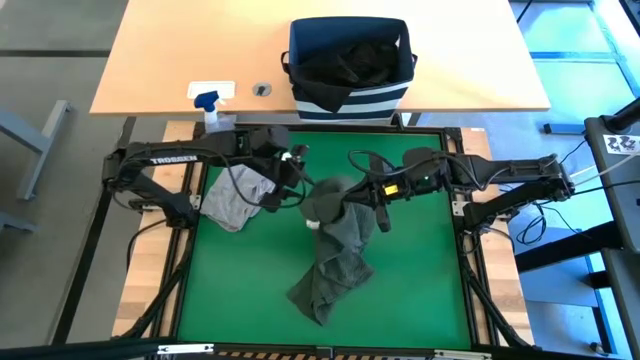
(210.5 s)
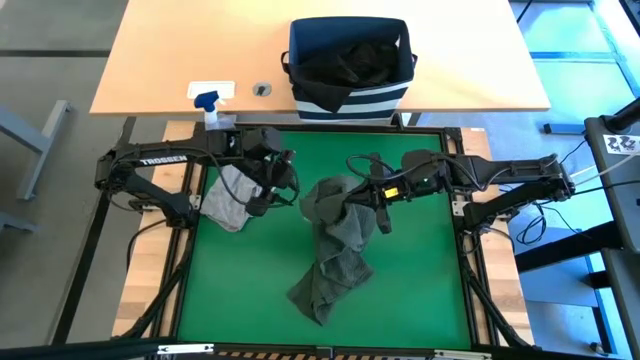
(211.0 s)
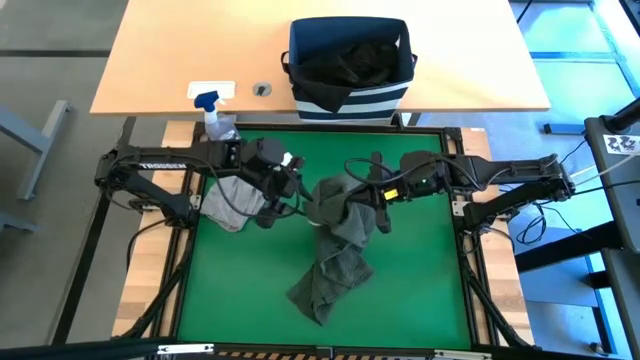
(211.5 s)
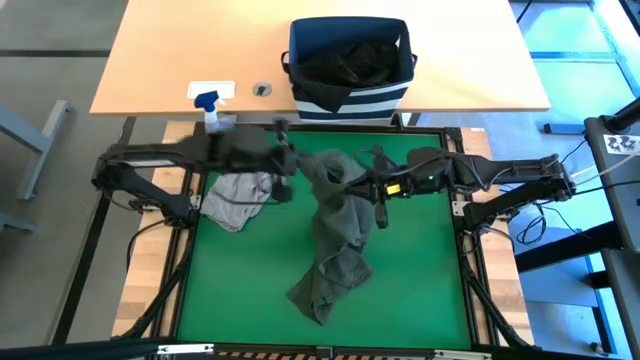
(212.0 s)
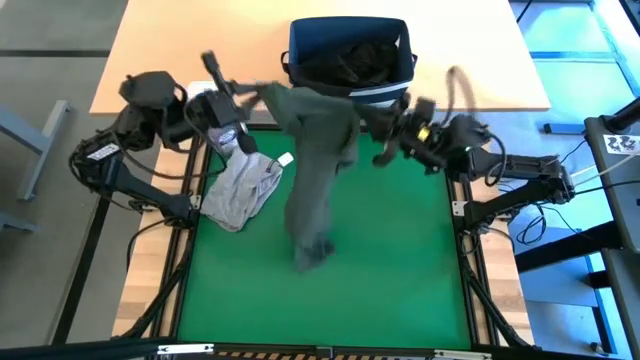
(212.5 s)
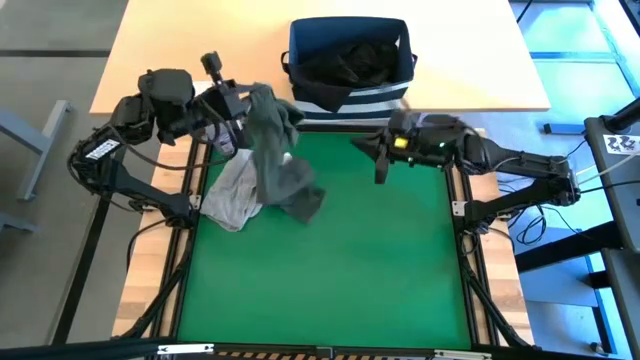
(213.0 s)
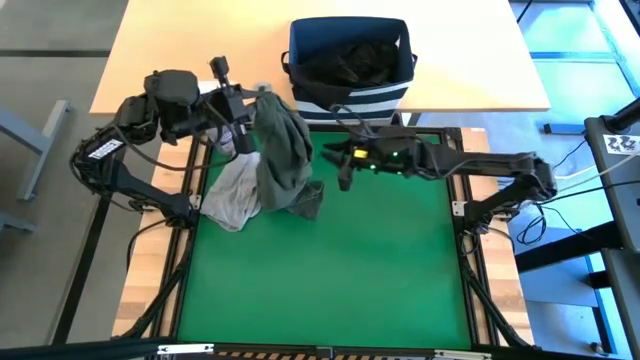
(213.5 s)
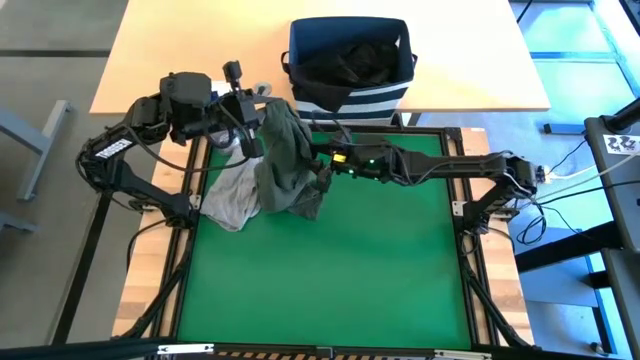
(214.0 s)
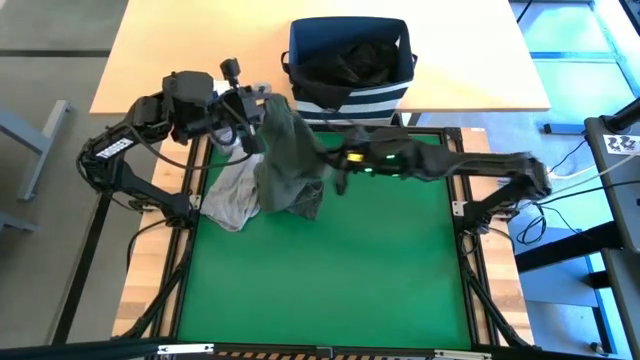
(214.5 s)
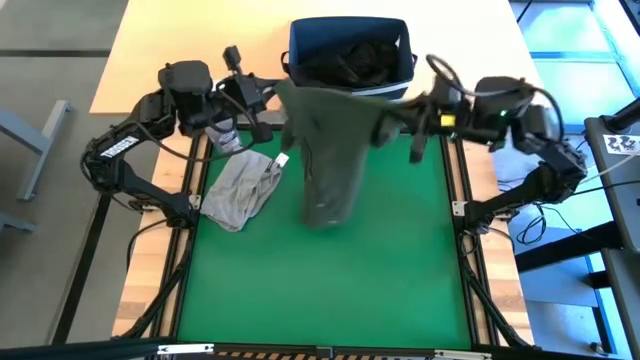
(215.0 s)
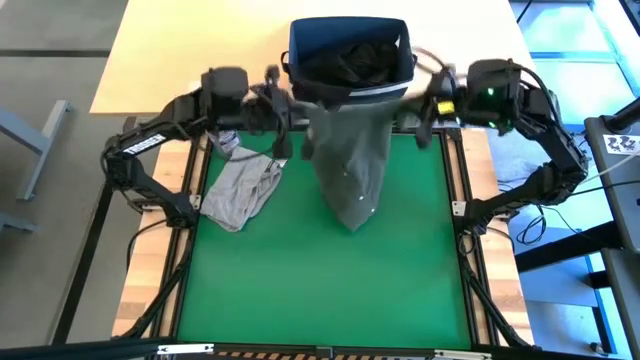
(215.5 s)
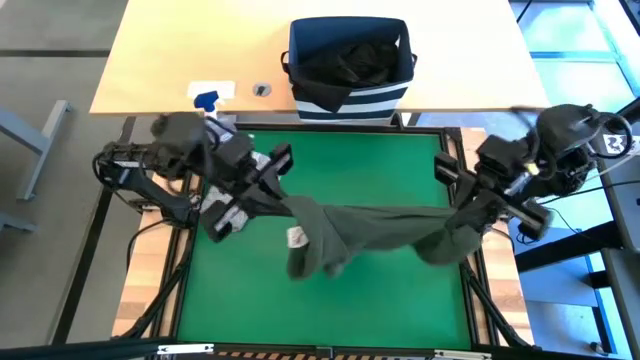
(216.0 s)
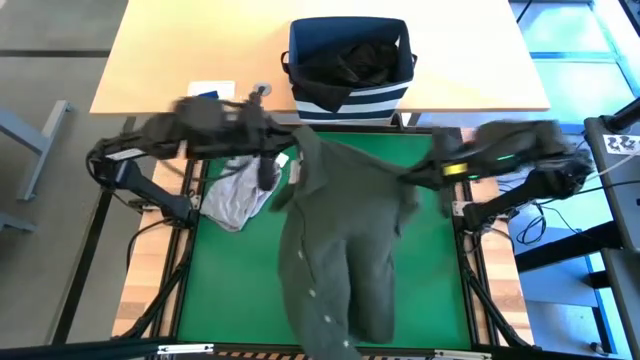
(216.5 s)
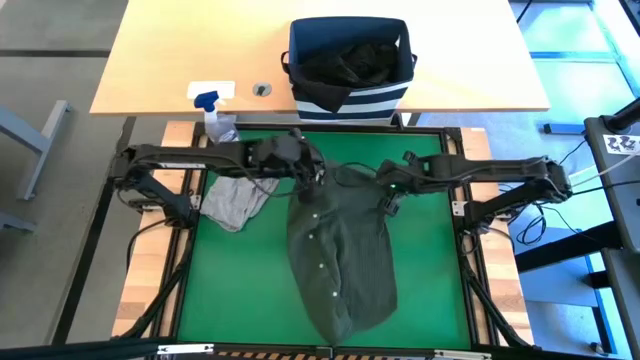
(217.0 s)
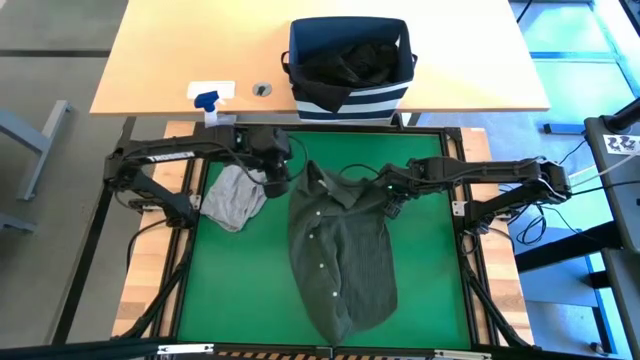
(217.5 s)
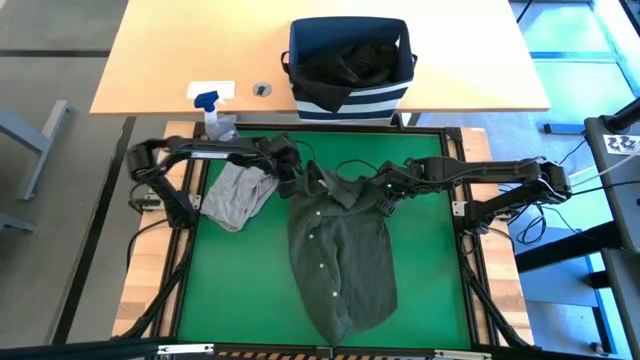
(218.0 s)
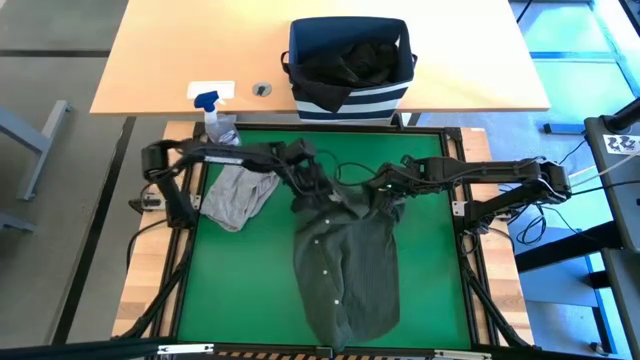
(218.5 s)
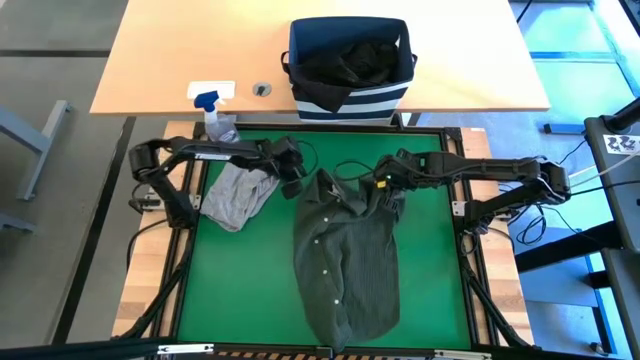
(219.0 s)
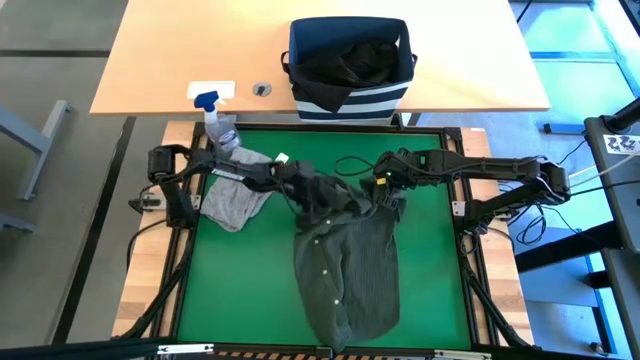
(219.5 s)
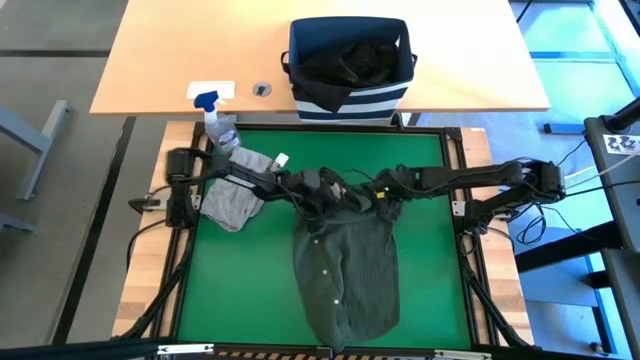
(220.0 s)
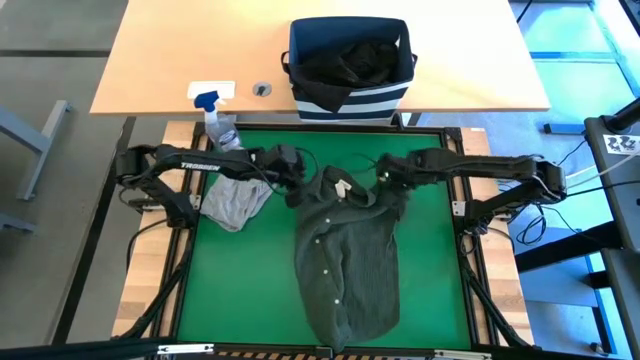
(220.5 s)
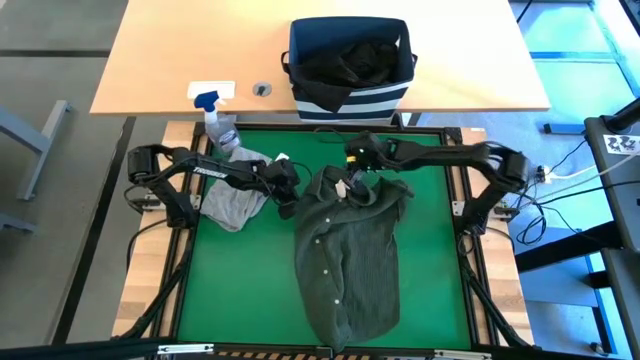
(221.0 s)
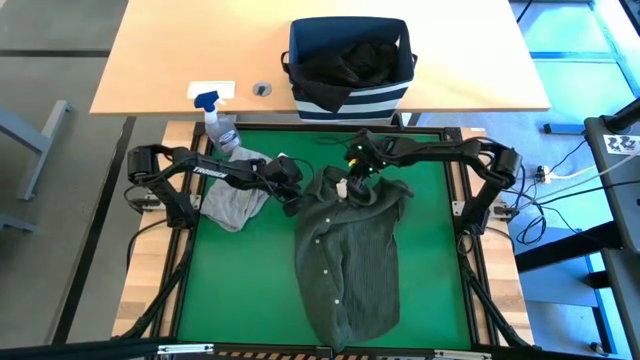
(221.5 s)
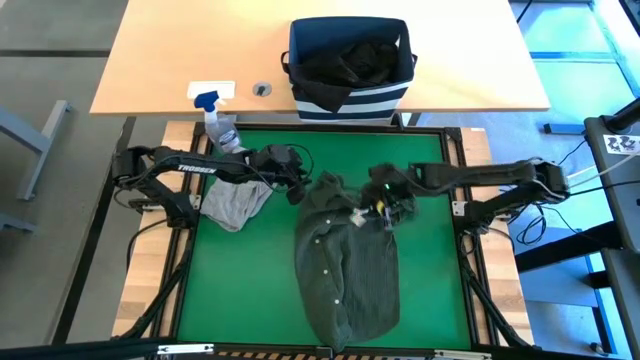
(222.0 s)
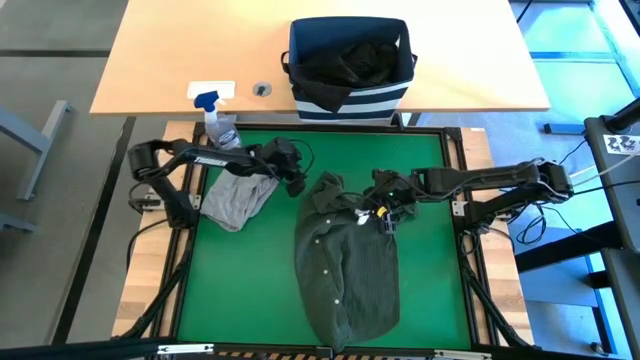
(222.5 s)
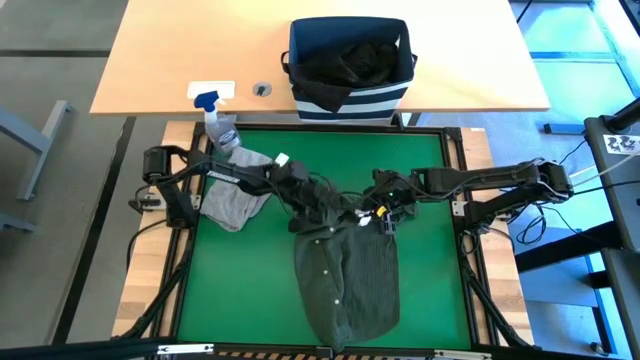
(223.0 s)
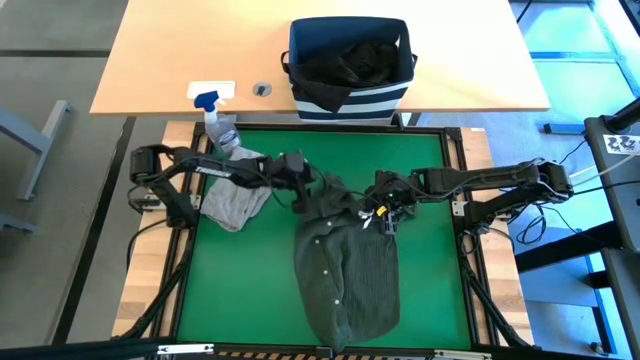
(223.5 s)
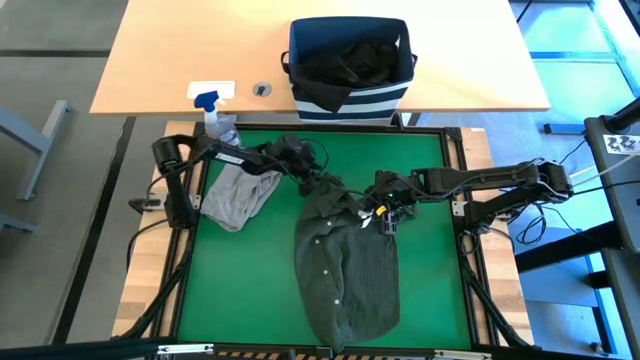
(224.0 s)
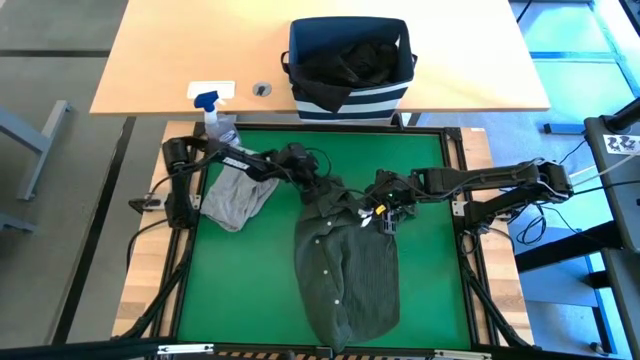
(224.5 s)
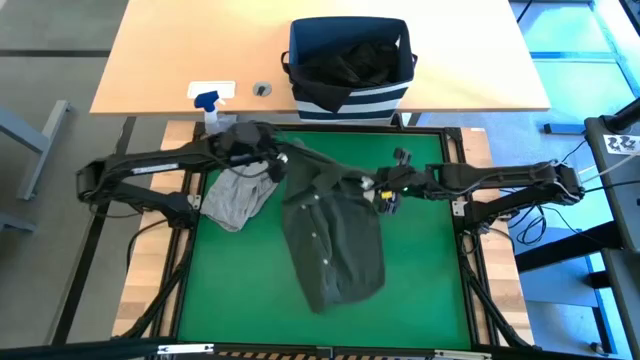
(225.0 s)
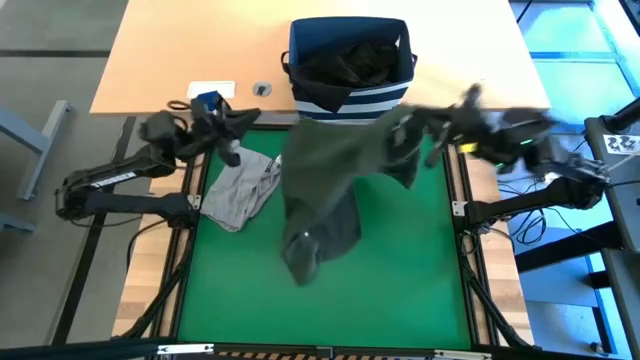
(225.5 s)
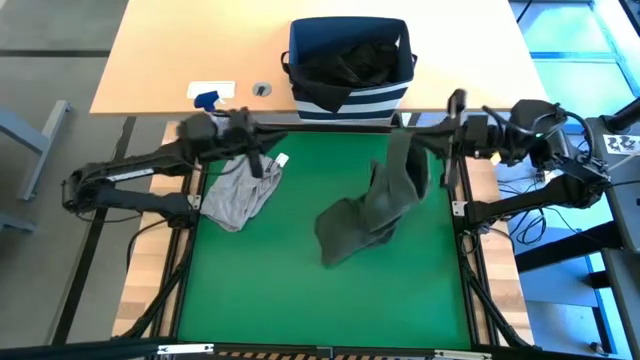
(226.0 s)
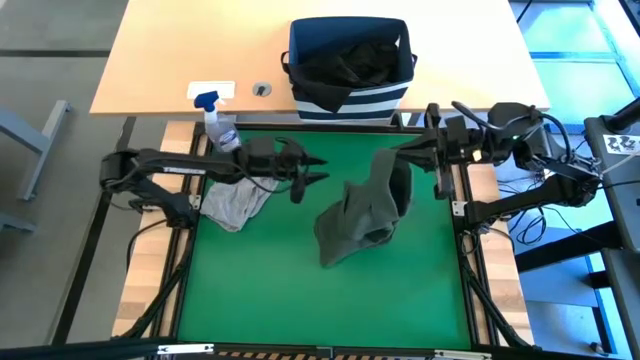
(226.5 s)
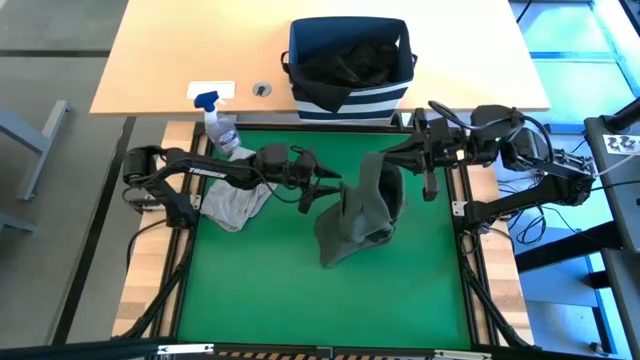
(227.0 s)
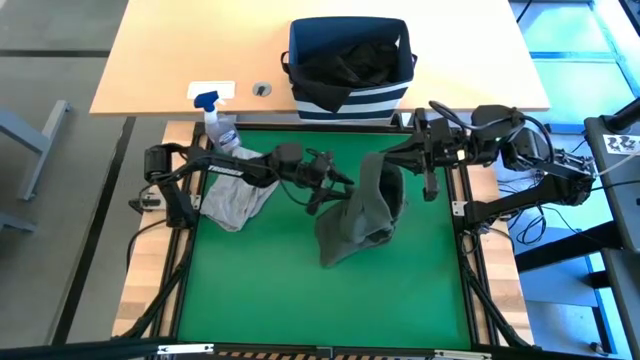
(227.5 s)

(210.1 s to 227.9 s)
Task: Fold Laundry from Bin
Fold the green shirt

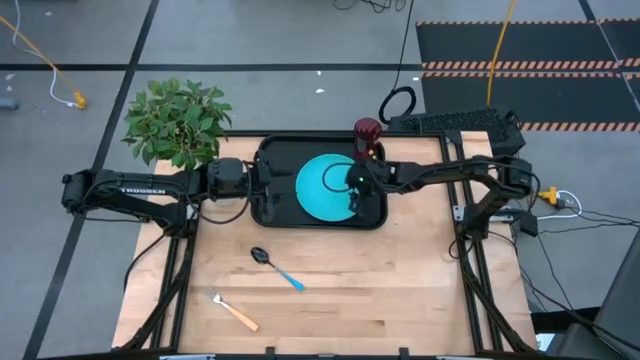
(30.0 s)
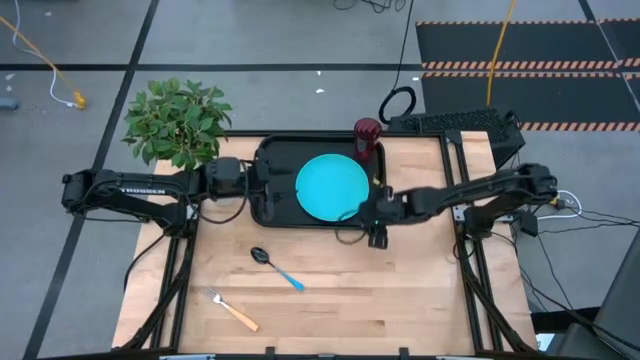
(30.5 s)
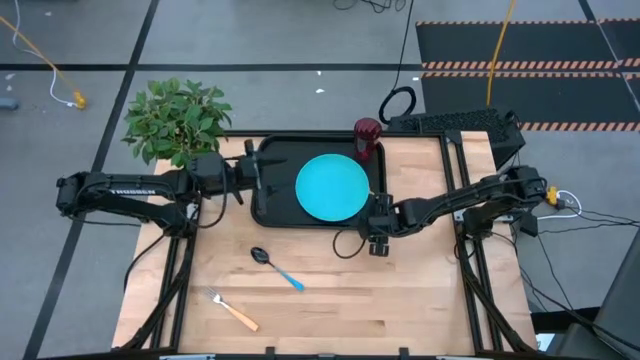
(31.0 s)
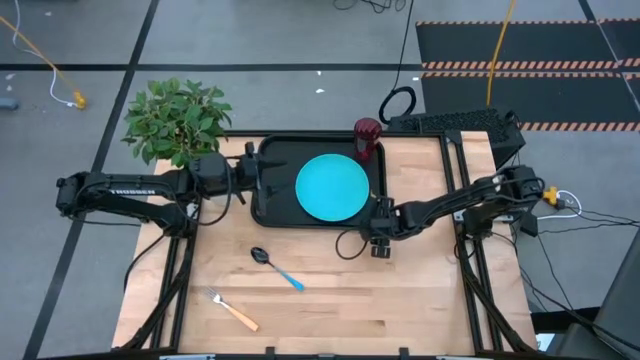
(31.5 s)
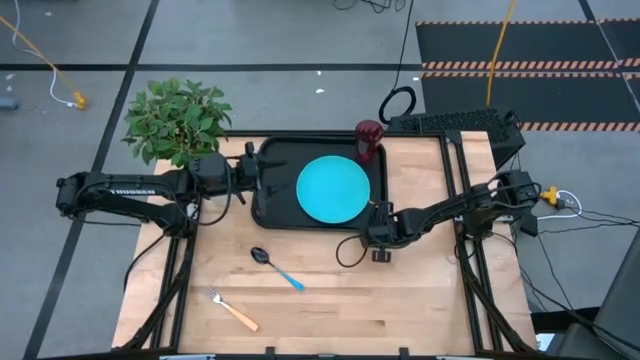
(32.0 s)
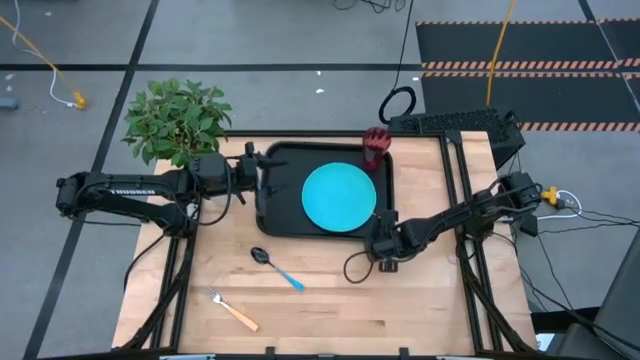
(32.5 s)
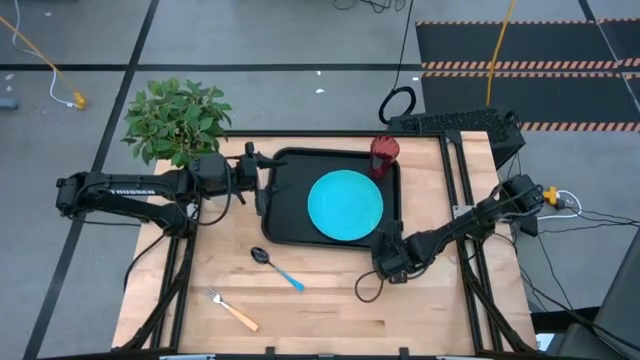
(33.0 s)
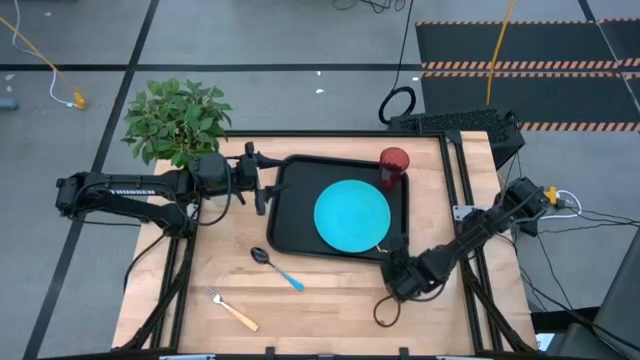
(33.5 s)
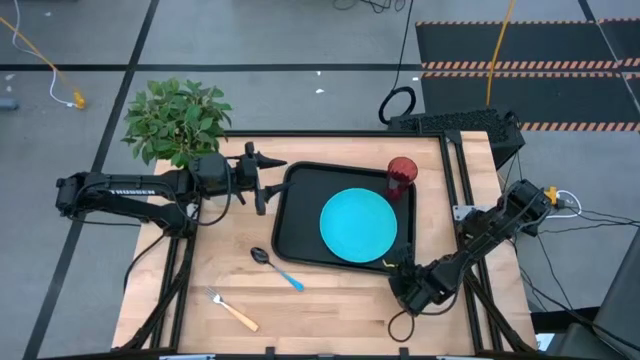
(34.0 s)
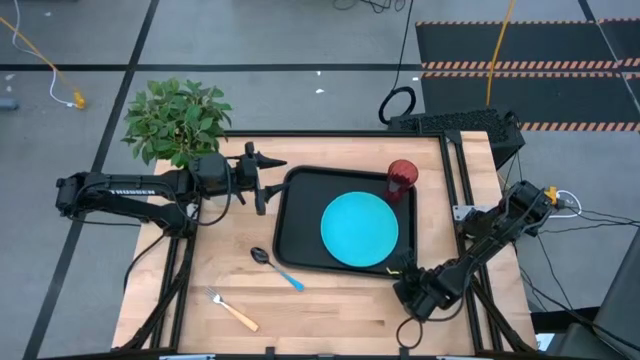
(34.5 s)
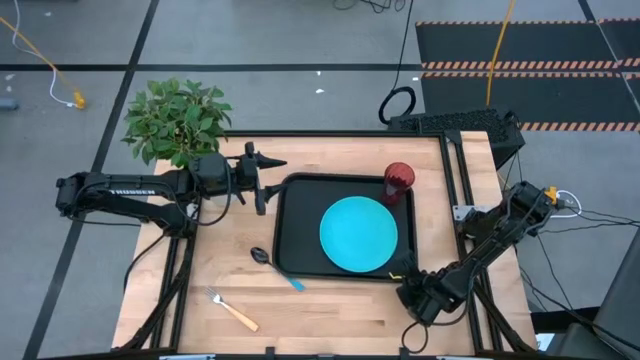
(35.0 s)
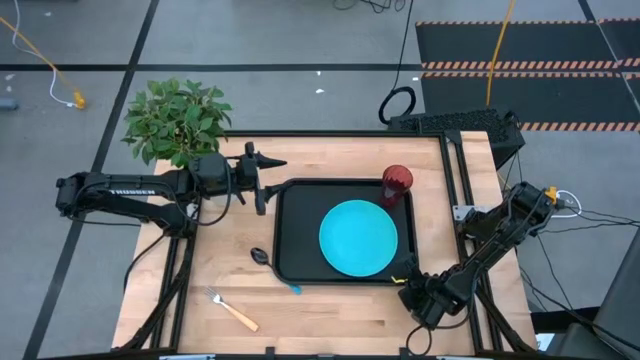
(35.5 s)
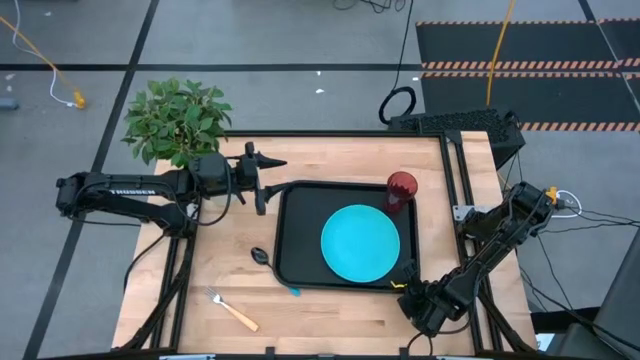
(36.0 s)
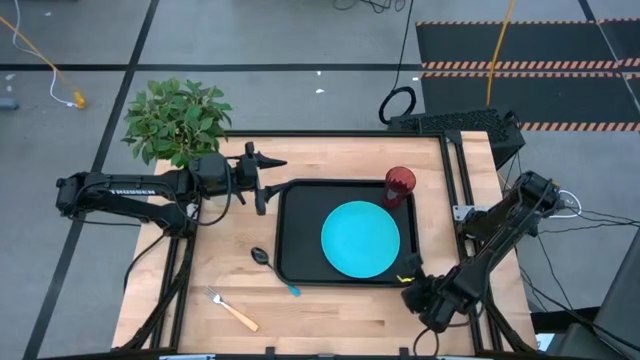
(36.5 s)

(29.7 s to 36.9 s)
Task: Pick and place plate/cup/fork/spoon on tray
Move the black tray to the middle of the table
